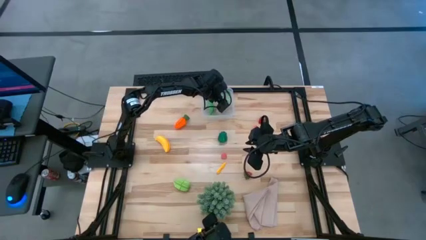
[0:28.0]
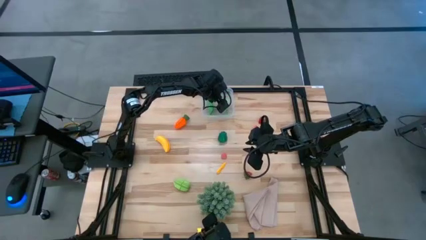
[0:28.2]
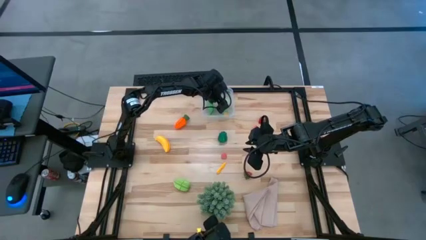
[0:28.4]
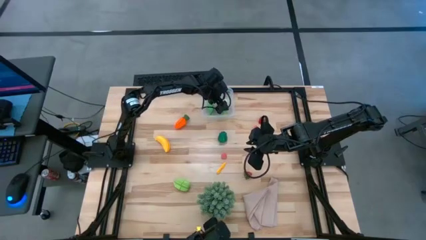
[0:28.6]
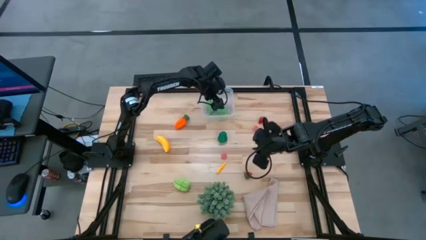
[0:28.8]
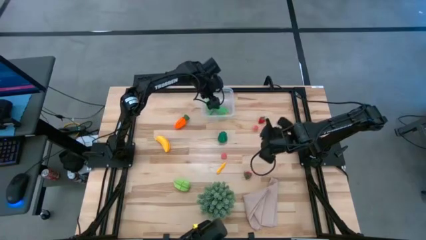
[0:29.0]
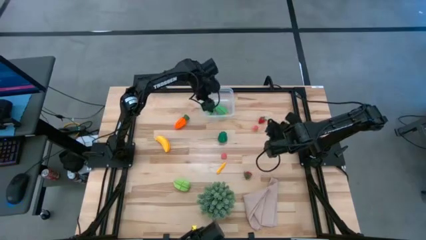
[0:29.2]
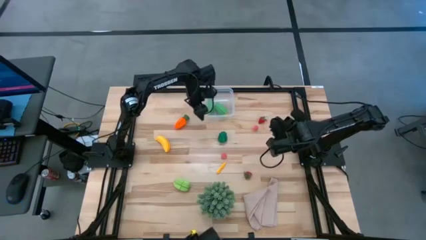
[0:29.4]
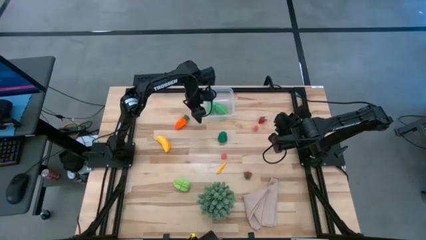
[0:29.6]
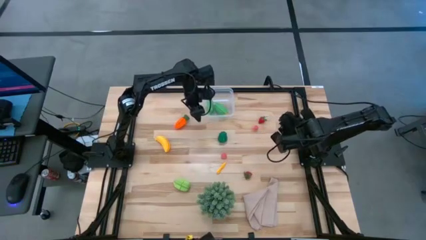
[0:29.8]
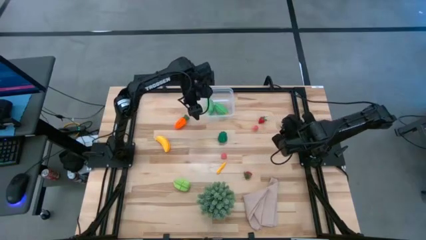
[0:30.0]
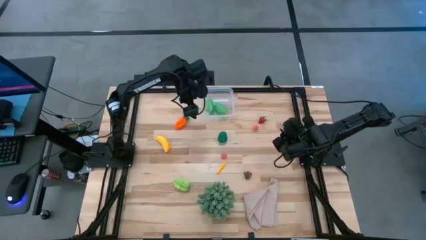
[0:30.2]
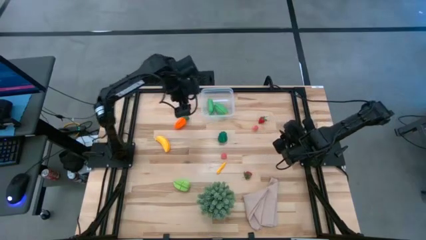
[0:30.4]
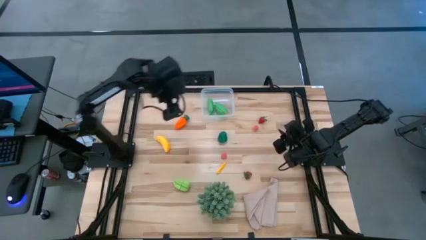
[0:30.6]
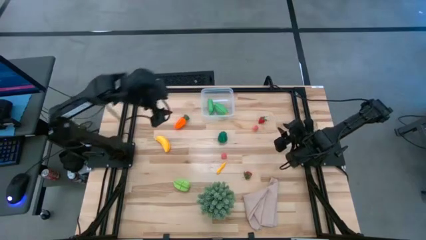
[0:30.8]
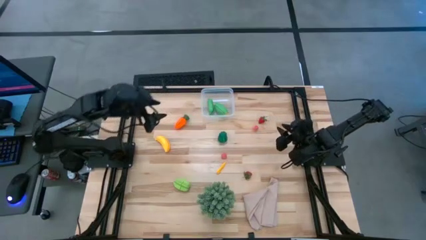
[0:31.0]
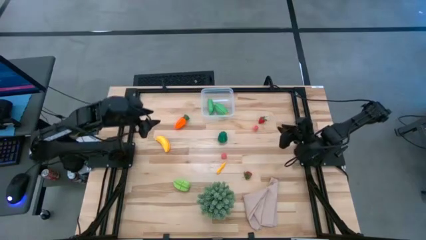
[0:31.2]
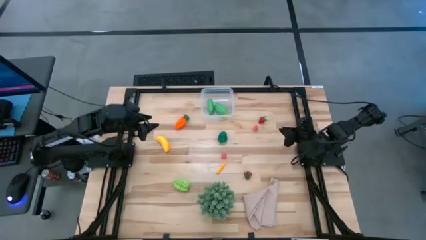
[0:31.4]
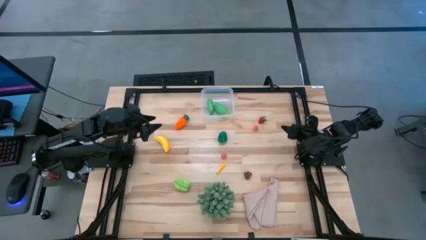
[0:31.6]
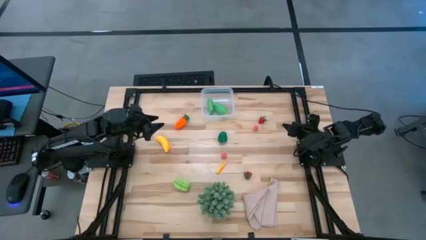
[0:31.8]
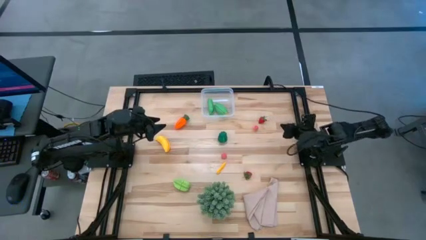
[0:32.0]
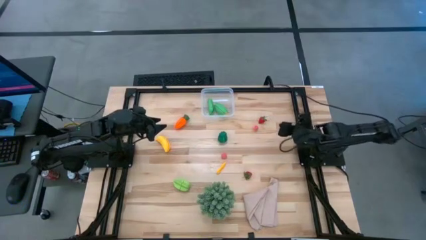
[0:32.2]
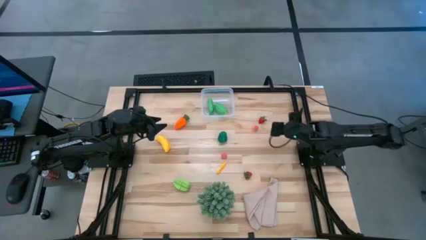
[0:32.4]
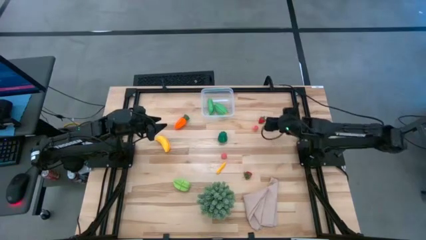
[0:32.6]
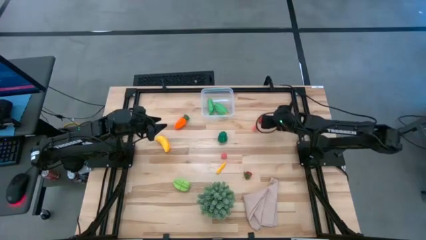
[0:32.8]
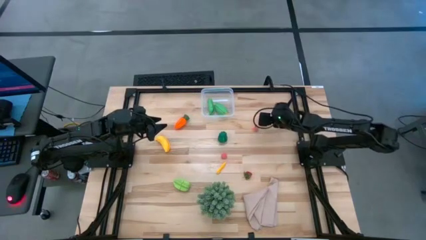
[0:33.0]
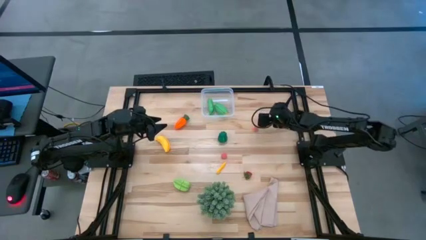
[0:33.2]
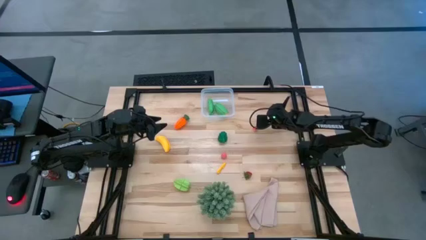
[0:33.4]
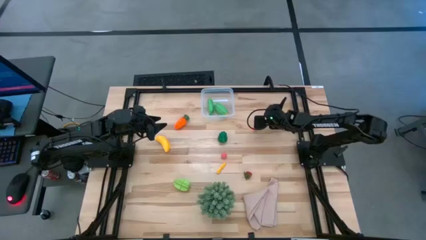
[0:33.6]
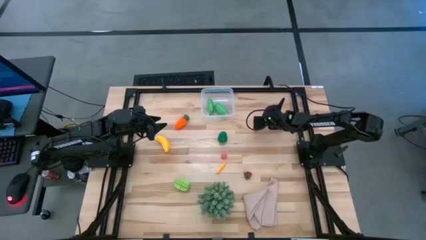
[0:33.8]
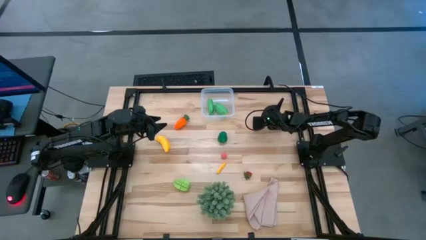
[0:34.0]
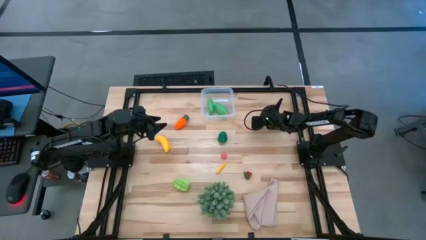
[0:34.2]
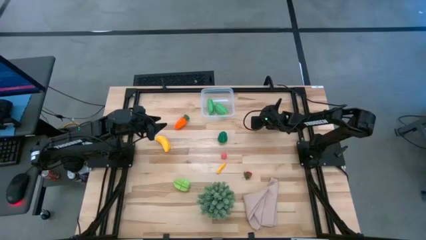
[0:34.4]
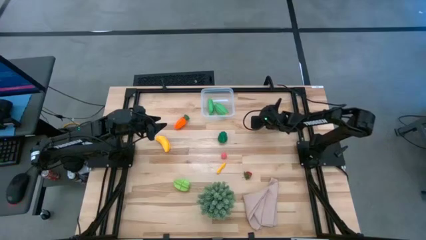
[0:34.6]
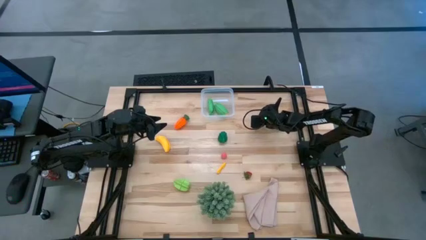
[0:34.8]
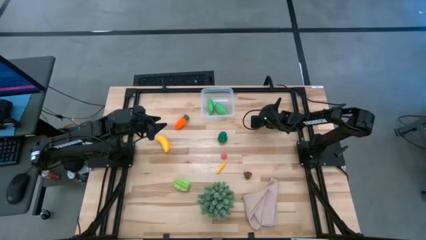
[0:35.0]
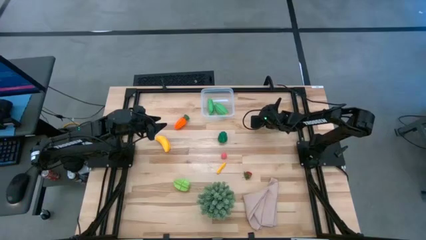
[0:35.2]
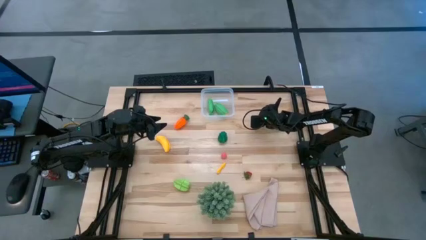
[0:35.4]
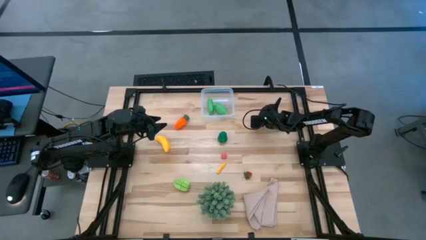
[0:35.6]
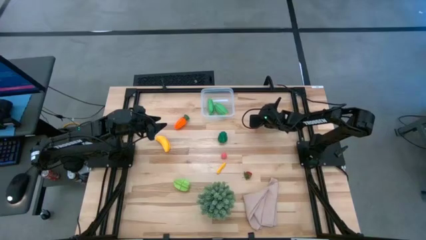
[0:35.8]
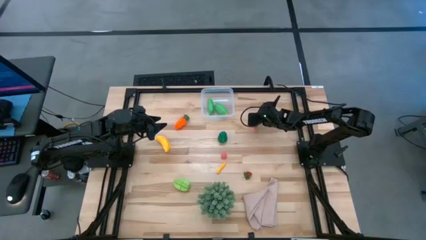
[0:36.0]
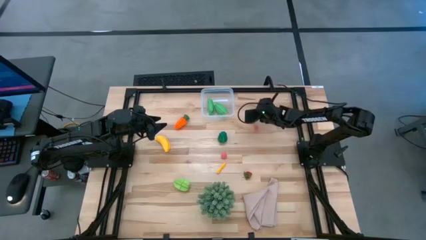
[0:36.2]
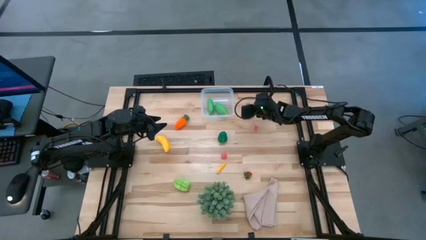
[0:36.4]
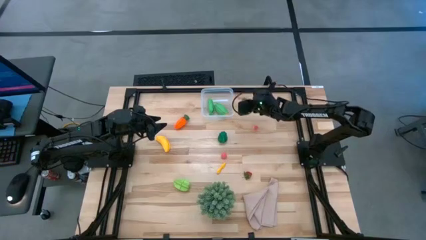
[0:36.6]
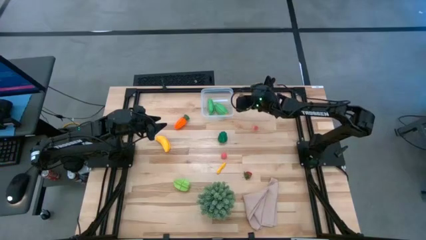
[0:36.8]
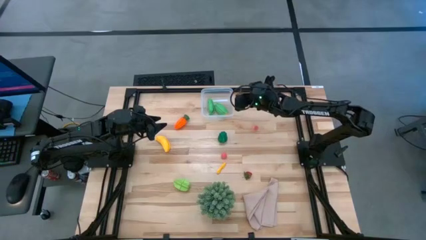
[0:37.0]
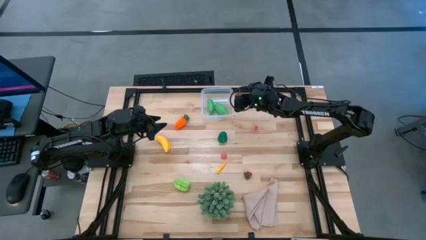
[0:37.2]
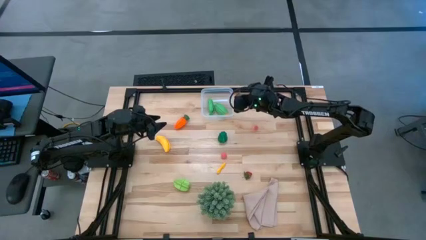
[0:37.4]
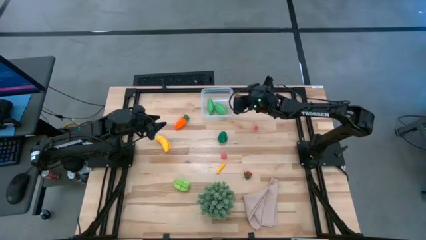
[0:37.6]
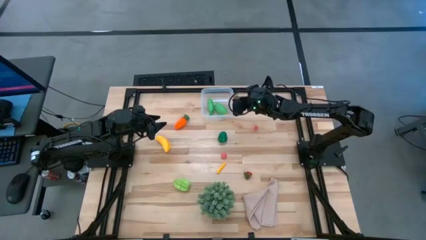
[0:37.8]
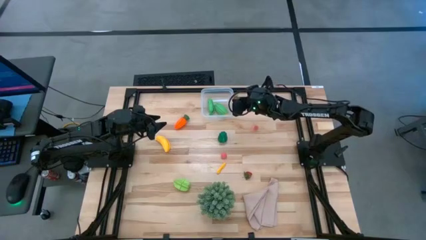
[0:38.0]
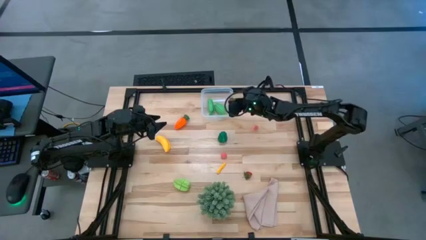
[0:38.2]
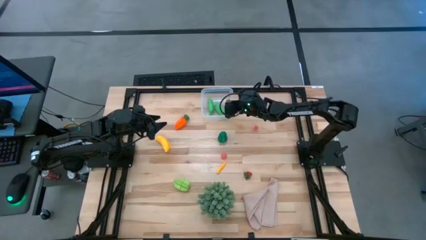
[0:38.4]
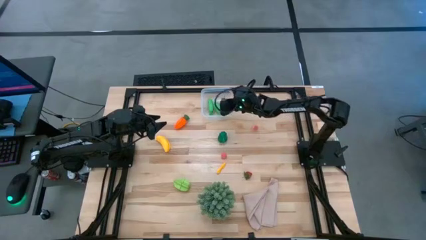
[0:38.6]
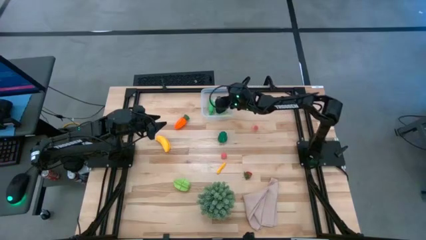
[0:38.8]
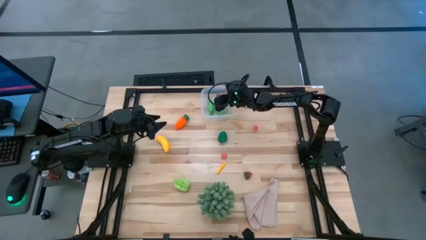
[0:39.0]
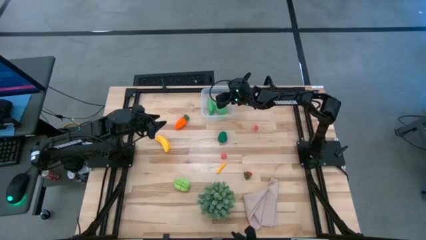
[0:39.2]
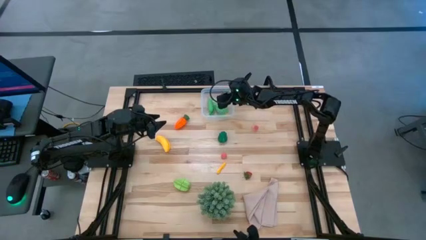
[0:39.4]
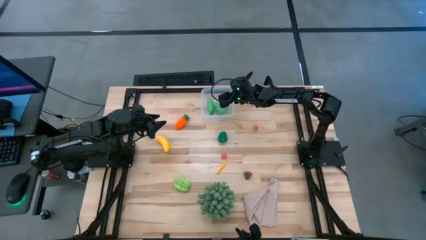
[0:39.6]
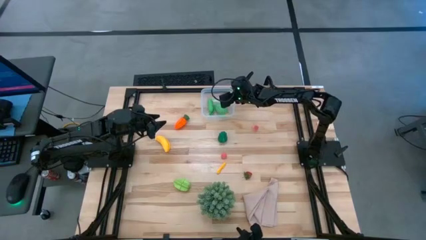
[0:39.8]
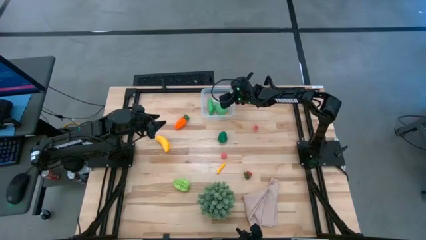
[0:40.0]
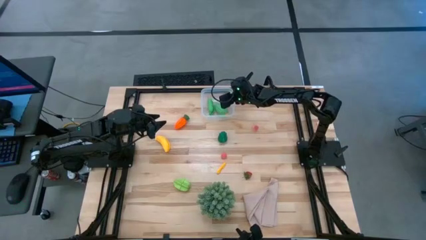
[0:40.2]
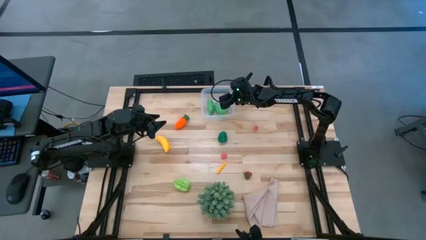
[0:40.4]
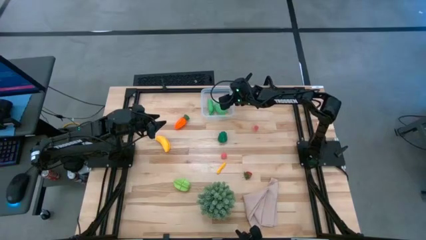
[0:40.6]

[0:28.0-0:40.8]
Task: Pick and placing Produce into tupperware
Put the top strawberry into the transparent bin

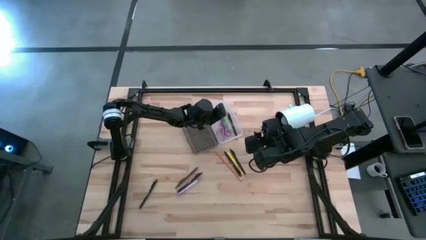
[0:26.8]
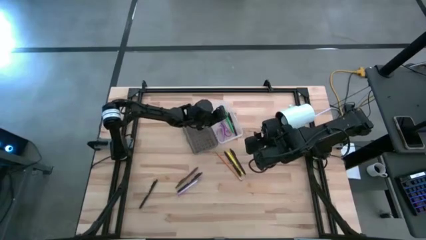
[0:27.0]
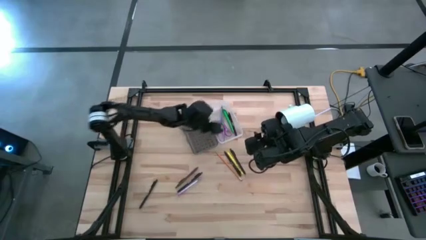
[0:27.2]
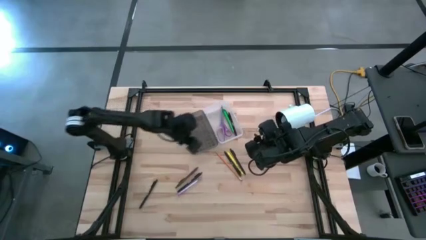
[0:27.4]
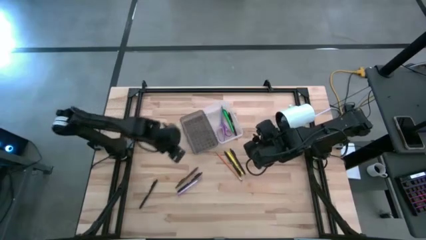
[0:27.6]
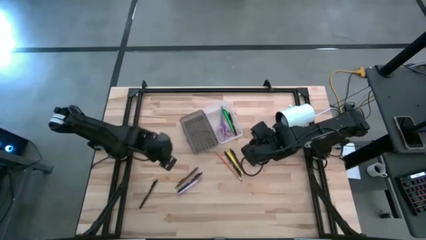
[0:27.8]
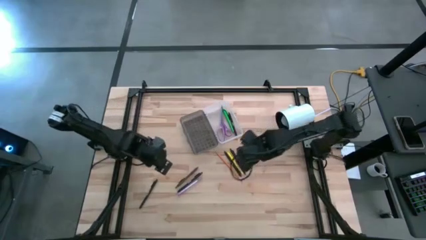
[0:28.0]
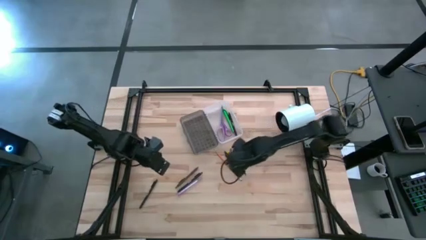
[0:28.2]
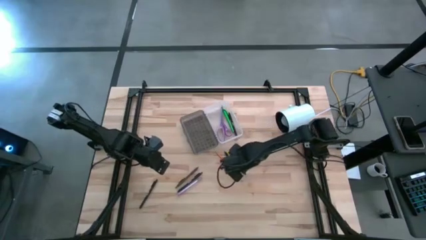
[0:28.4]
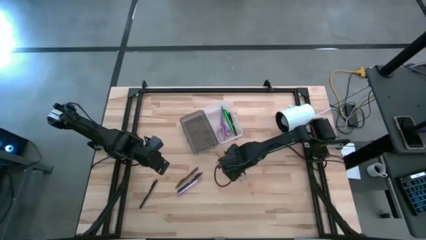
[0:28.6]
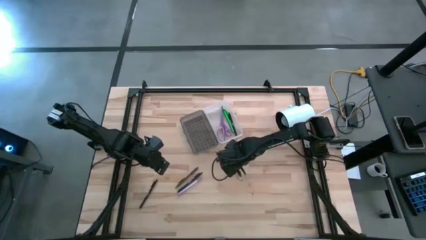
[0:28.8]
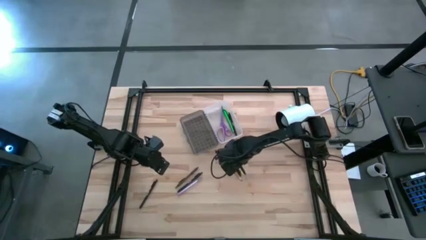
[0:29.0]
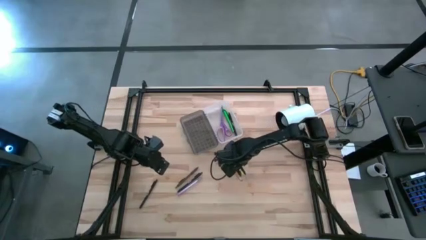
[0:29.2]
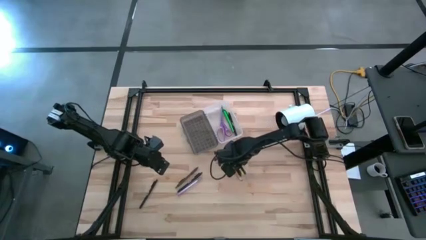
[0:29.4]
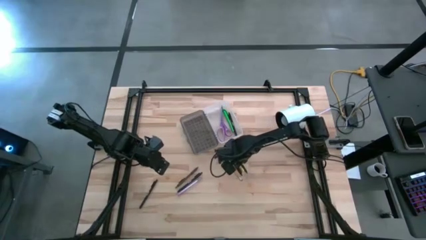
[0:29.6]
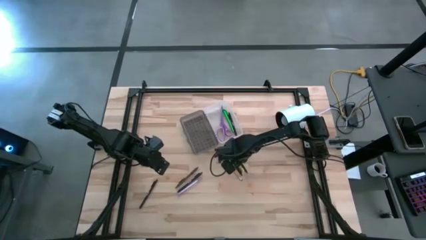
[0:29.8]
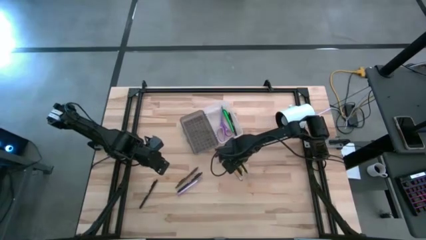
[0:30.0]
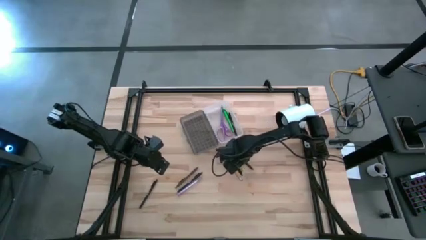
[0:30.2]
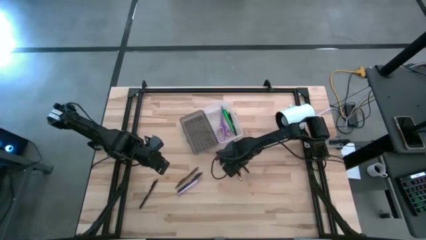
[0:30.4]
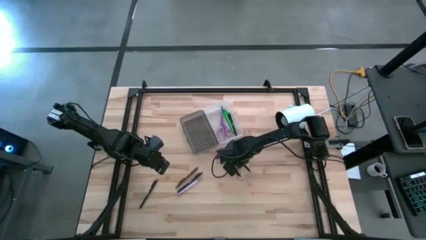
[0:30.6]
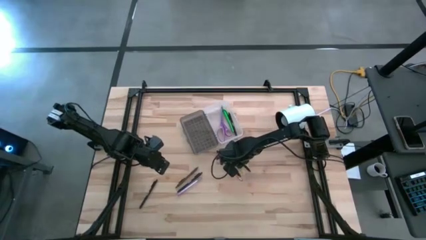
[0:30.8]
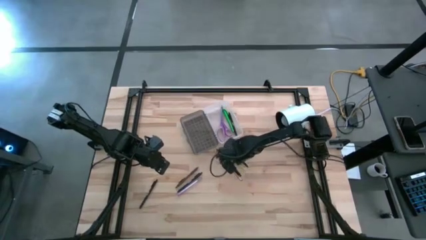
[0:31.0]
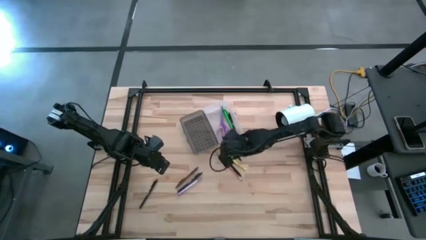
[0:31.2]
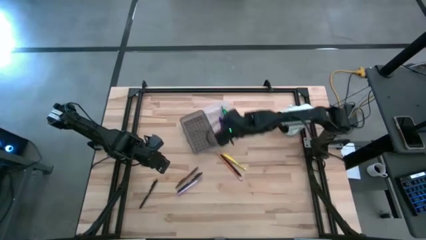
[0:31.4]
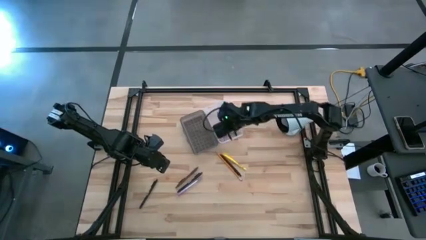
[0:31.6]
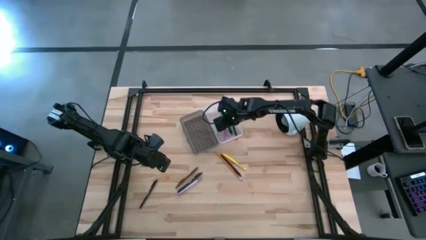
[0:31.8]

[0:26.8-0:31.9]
Task: Pick & place school supplies into a supply box
Put the black pen into the black supply box
